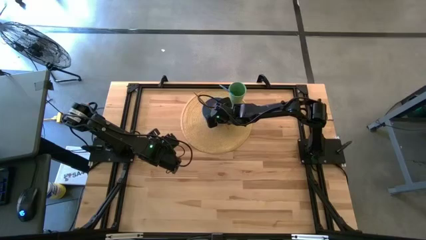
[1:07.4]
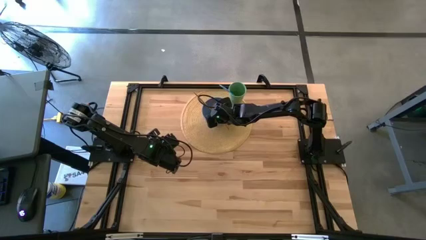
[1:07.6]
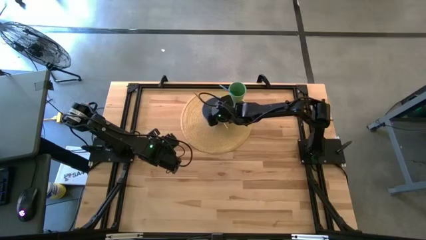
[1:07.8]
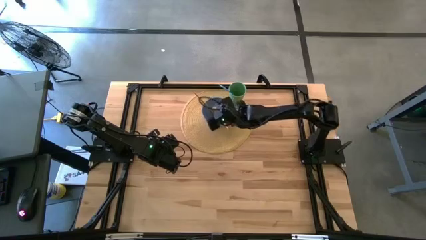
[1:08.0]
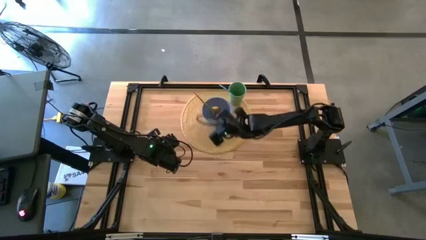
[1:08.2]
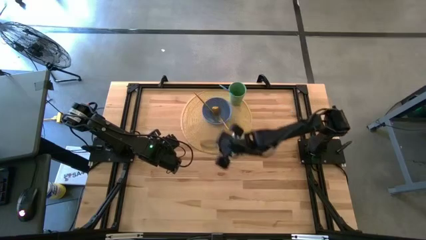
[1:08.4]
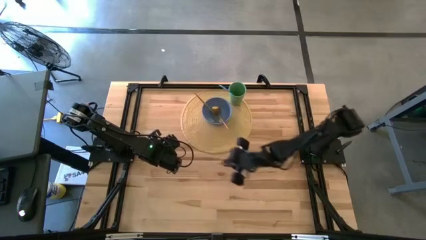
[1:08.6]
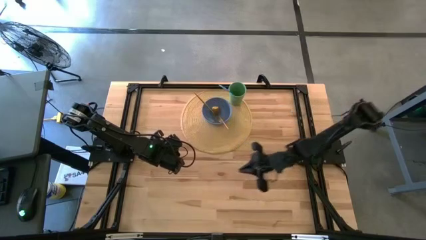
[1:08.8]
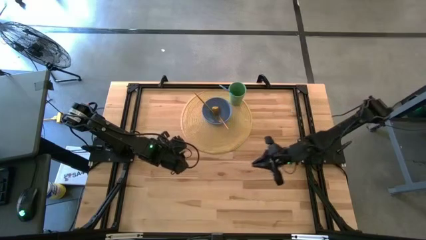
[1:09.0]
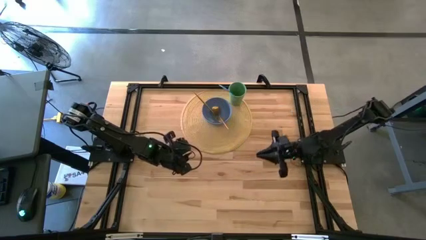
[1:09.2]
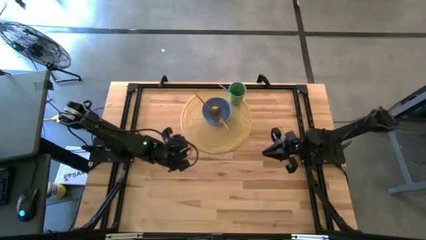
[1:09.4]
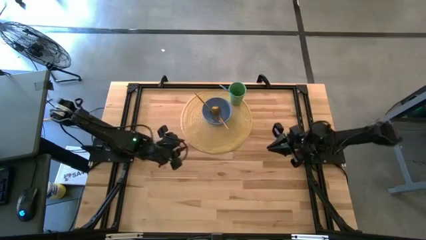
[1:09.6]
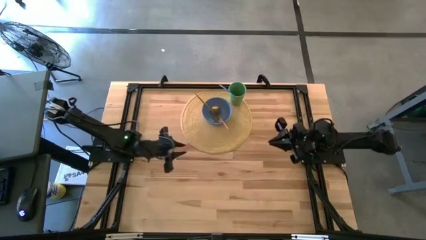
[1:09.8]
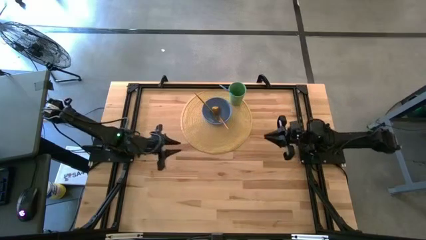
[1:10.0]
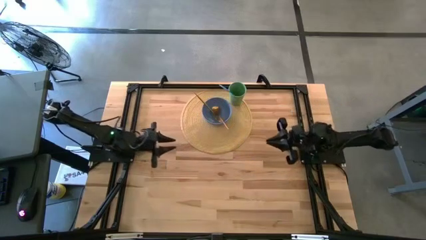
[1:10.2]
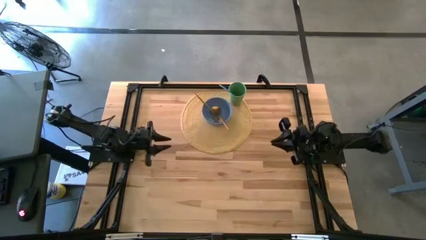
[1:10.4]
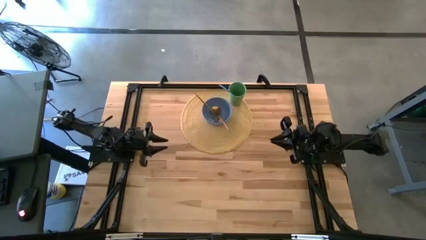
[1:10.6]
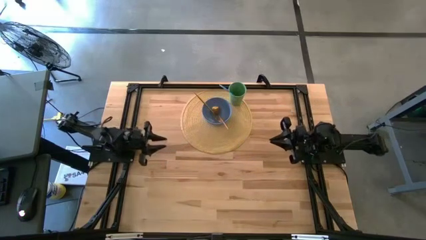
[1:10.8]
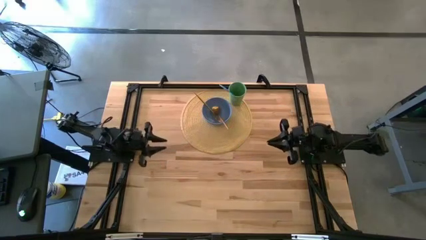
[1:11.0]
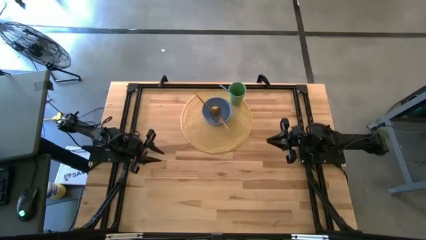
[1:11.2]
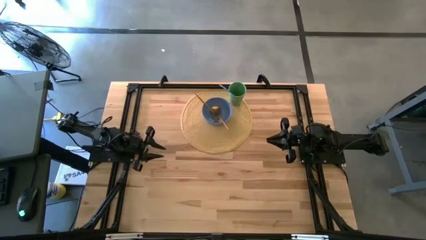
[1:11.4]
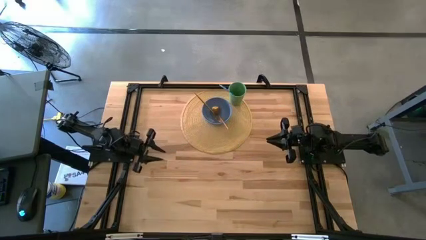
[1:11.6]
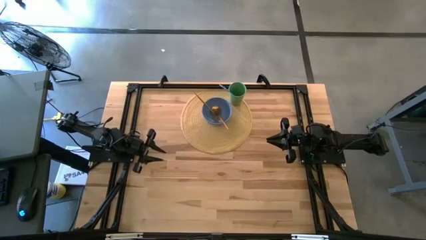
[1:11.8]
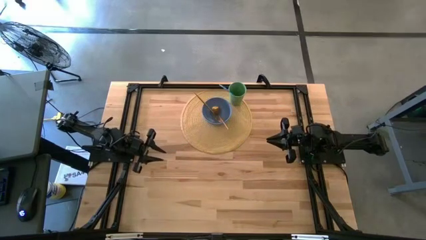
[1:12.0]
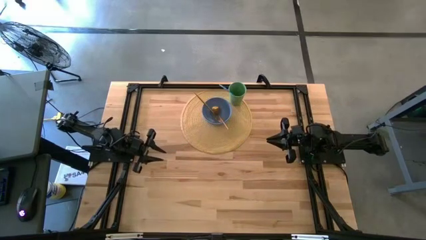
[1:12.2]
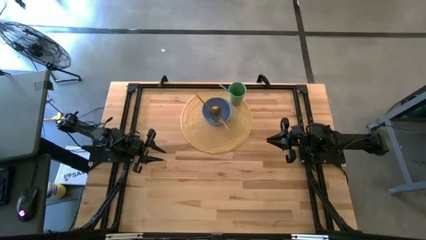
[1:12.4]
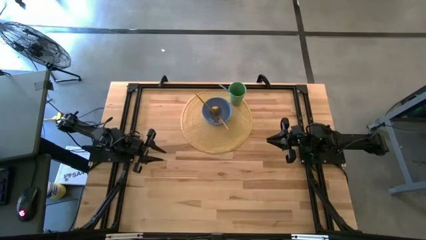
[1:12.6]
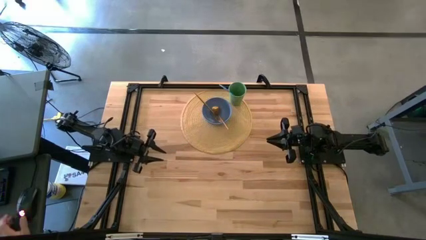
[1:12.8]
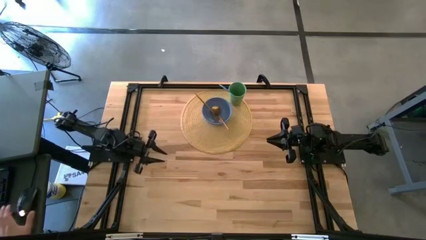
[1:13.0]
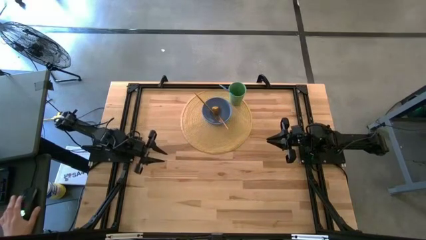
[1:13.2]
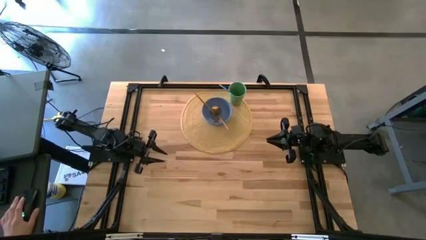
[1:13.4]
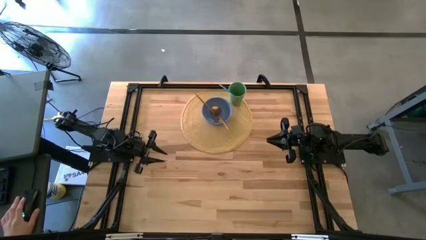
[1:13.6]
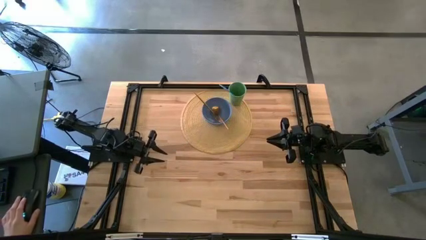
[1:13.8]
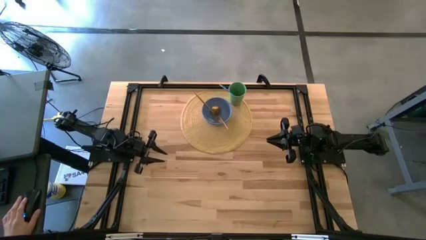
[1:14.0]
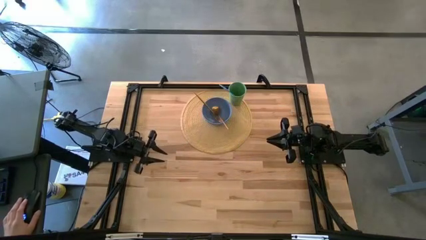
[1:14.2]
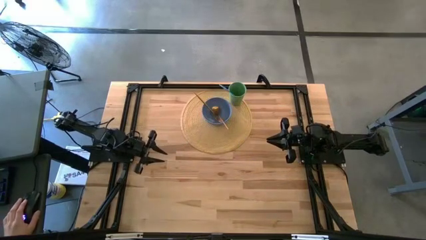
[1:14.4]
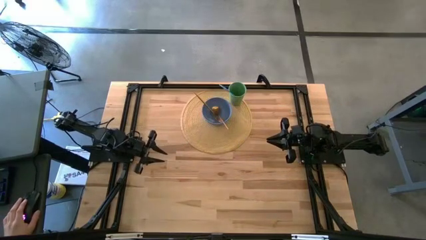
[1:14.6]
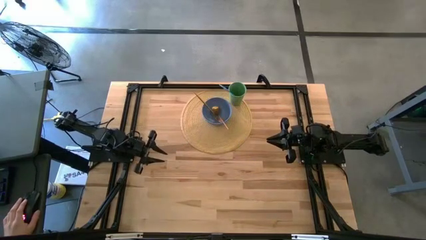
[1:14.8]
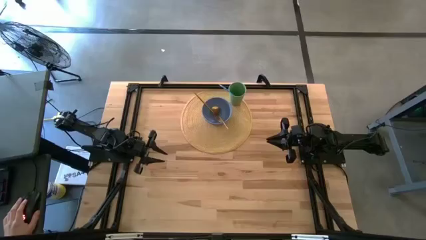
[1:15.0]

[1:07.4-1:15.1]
Task: Pick & Place Utensil
Return to Home Position

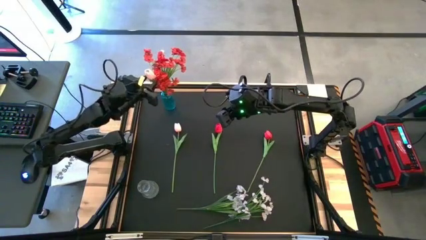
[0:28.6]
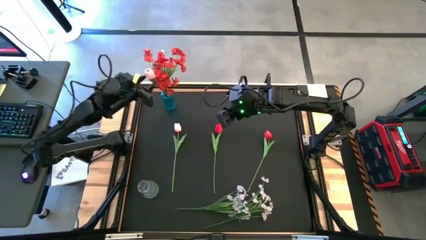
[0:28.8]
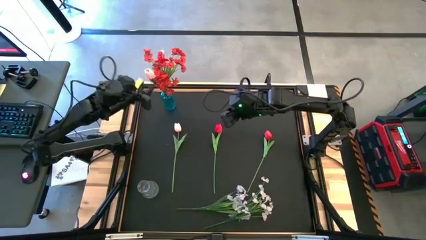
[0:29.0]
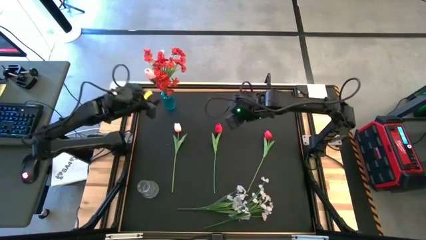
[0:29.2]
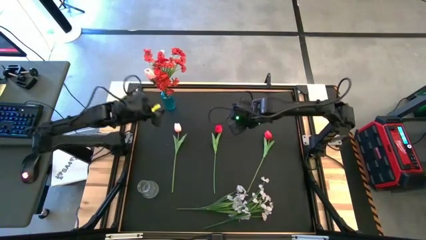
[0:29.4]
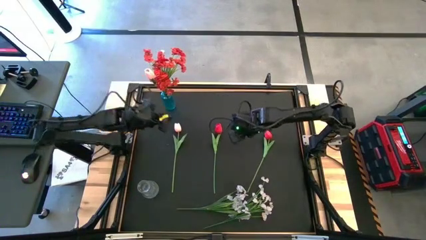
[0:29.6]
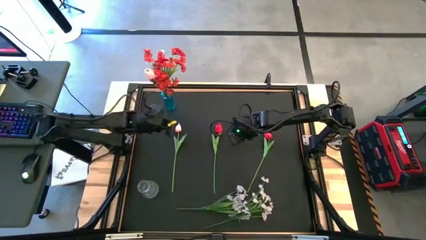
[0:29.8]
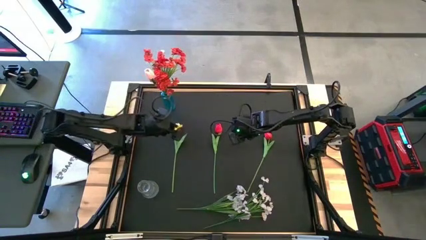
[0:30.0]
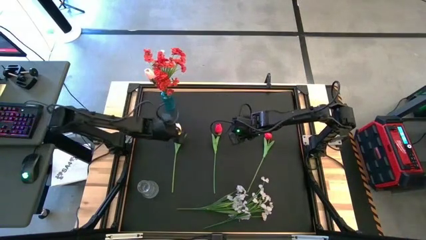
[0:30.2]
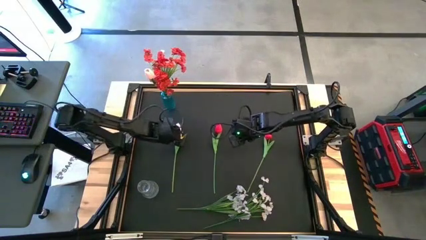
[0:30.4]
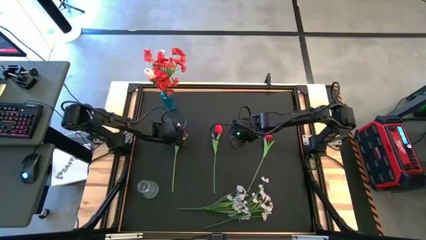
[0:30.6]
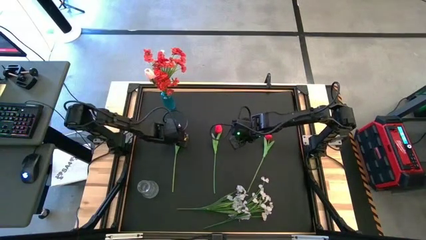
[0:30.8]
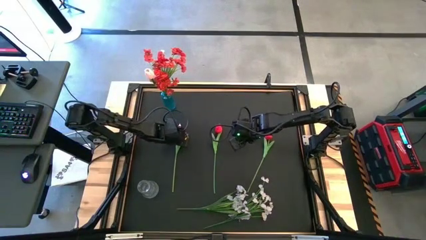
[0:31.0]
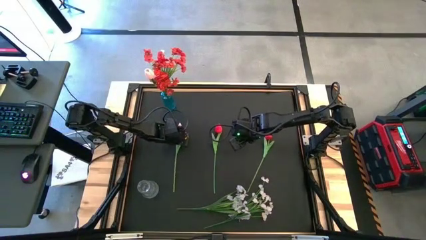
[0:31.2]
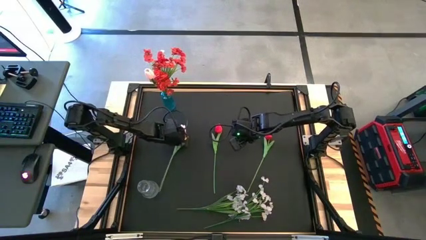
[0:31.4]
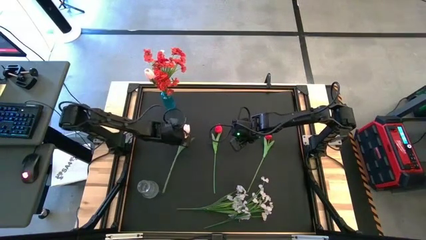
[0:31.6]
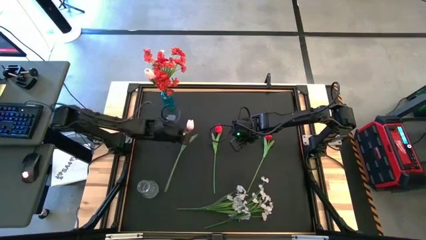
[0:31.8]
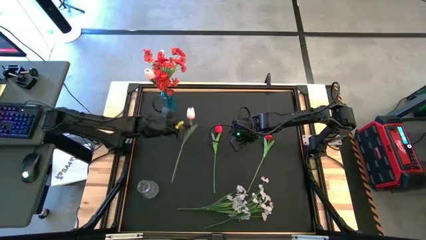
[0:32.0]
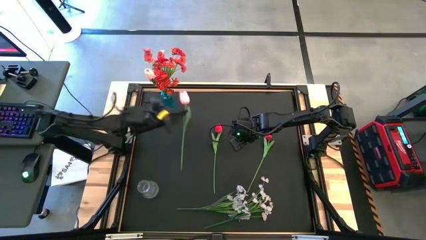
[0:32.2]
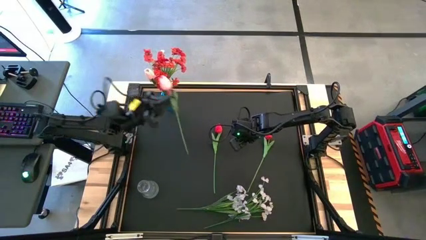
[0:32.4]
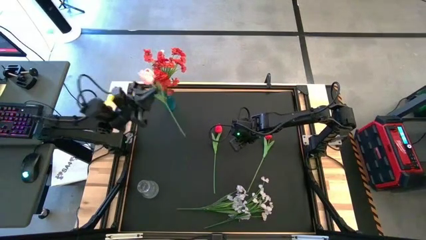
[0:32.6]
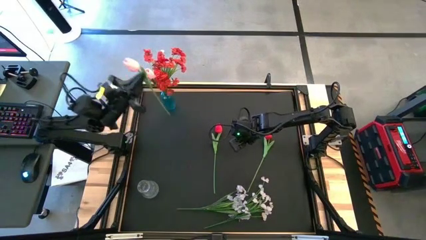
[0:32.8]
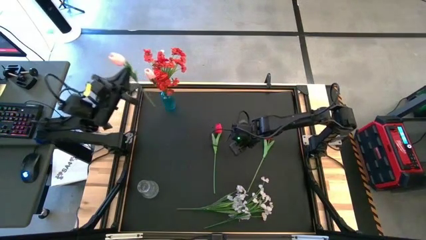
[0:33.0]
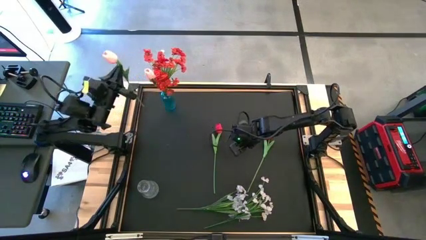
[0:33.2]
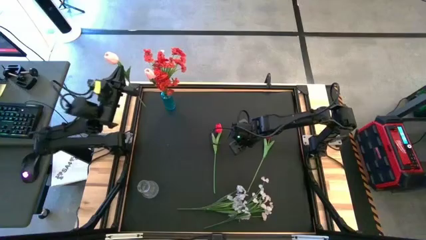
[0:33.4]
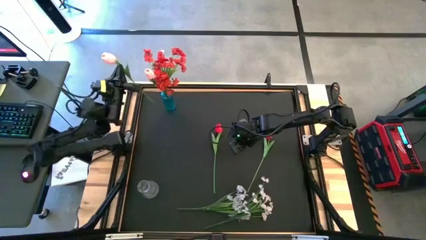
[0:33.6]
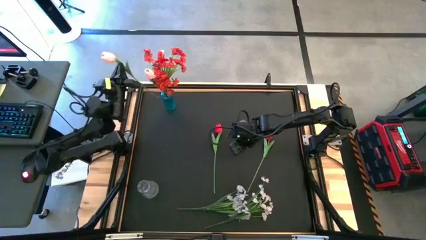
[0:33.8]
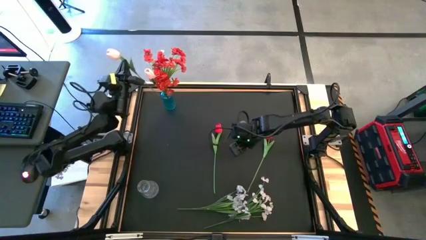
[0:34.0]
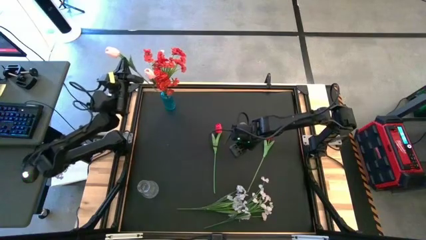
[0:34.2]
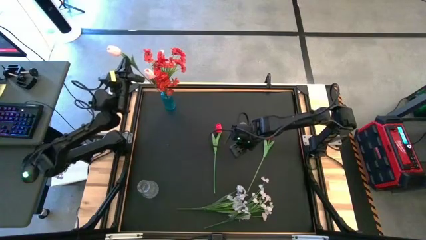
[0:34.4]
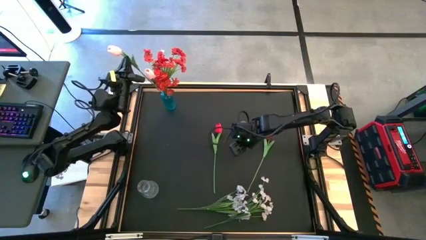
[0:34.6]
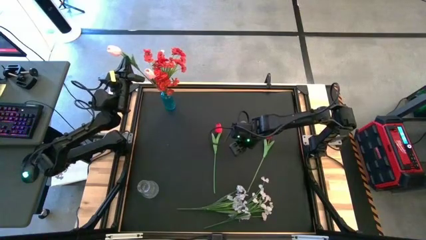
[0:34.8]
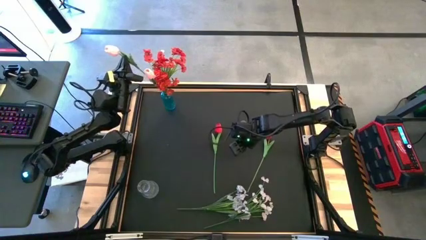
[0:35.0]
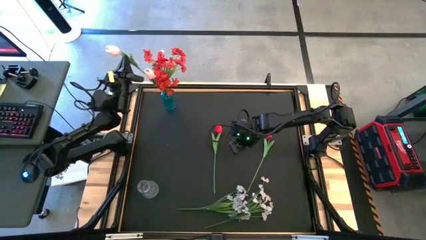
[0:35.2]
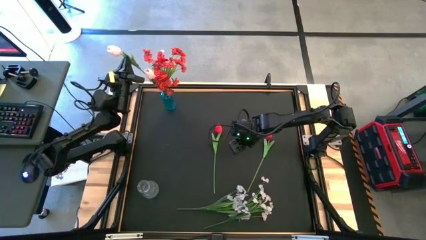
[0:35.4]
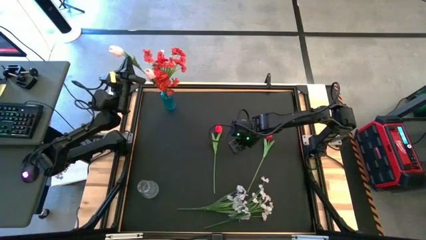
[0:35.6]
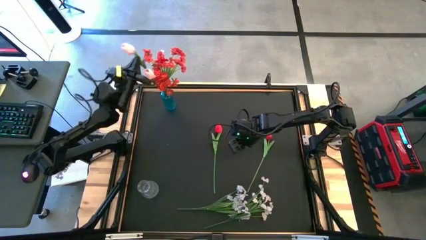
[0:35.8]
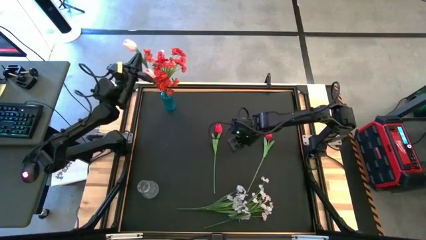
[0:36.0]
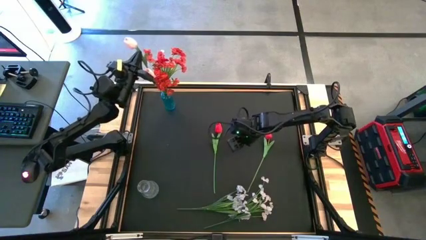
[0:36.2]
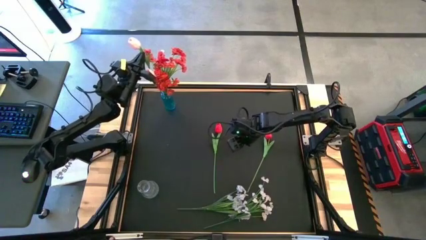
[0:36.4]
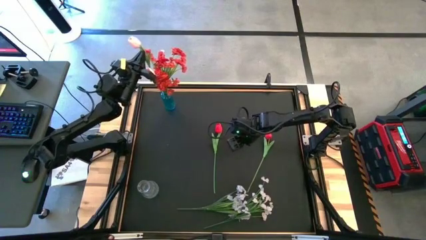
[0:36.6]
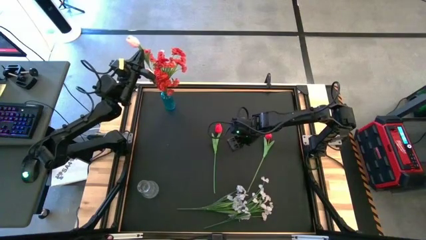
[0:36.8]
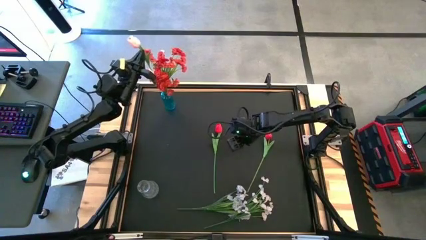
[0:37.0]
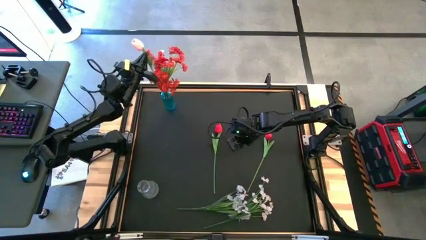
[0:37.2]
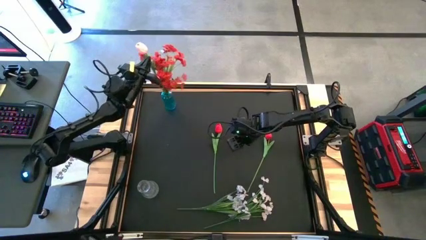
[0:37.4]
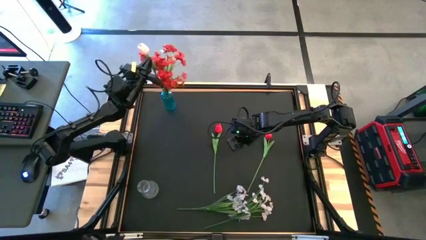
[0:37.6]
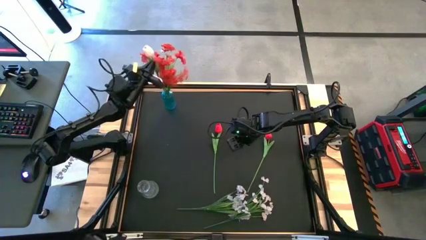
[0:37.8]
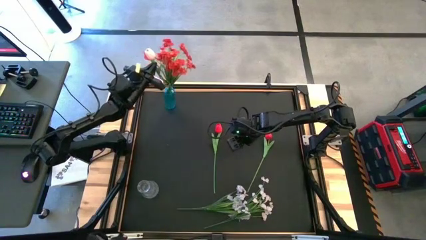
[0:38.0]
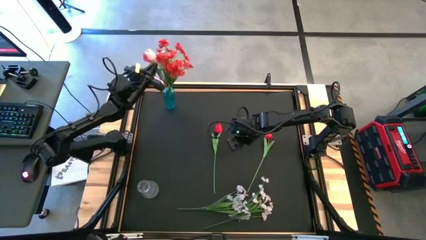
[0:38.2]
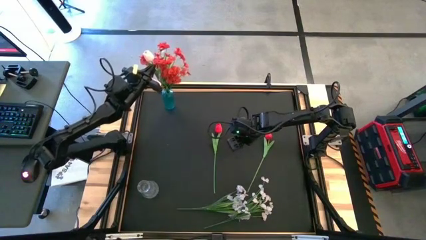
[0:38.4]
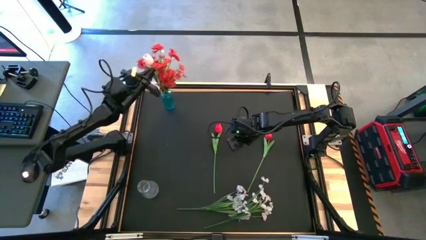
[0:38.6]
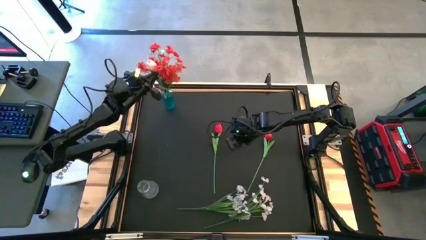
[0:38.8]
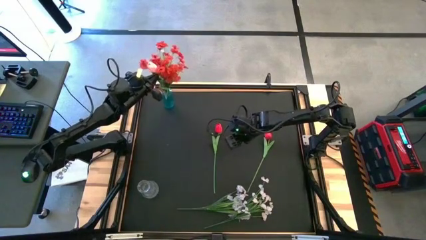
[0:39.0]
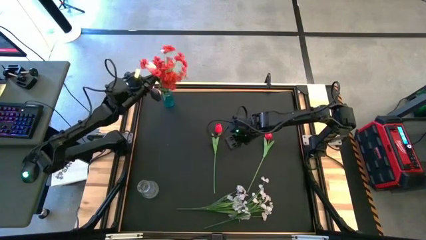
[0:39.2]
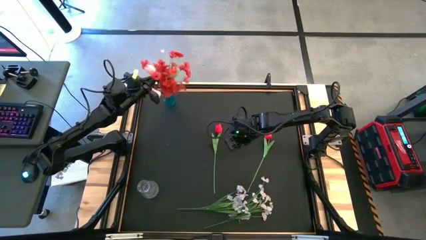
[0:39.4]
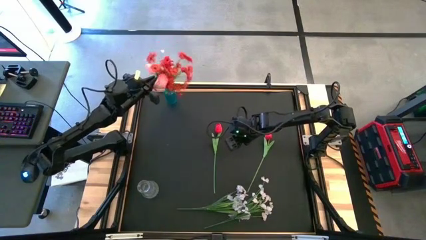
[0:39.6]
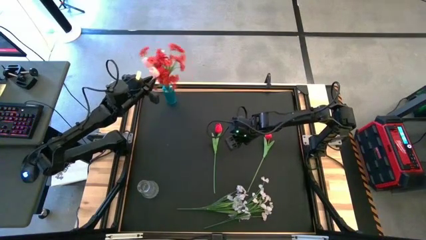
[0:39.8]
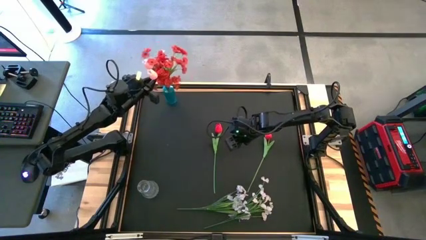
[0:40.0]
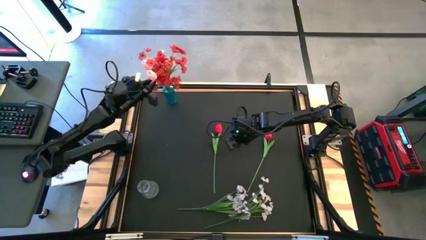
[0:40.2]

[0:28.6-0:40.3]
Task: Sort flowers into vase by color
Put the pink tulip into the blue vase
